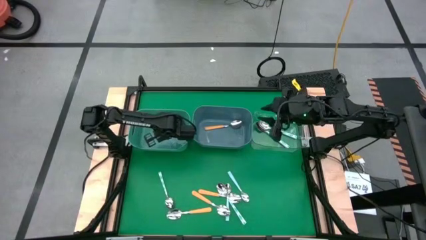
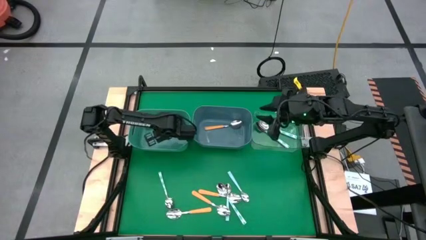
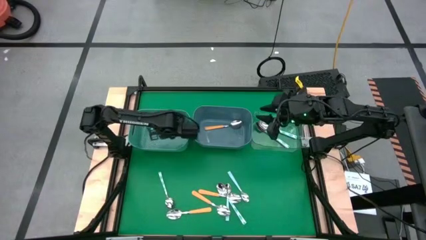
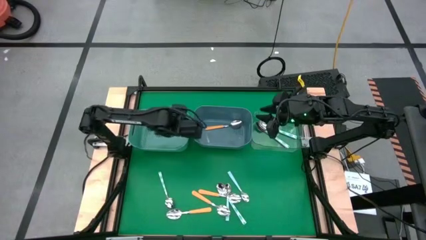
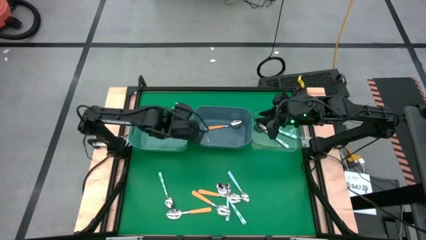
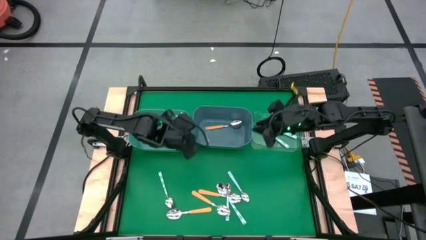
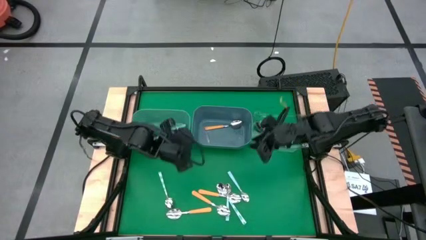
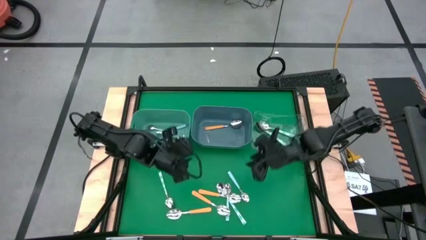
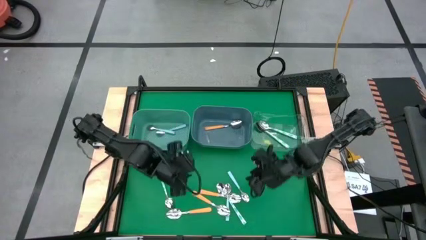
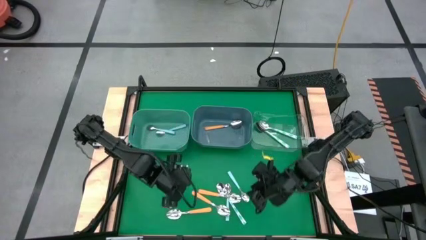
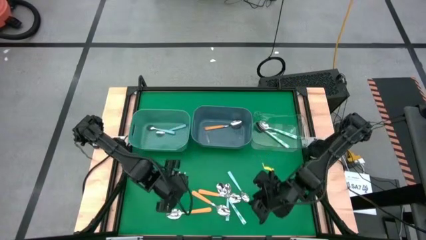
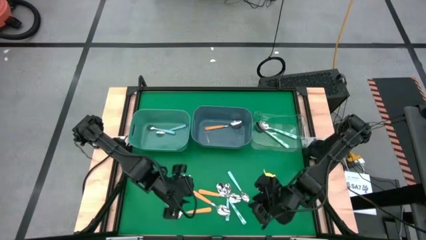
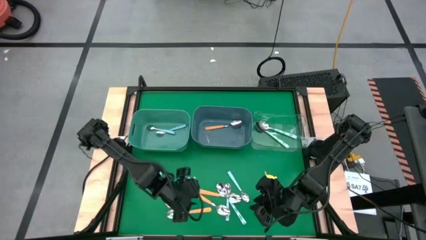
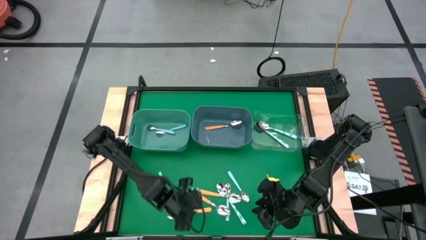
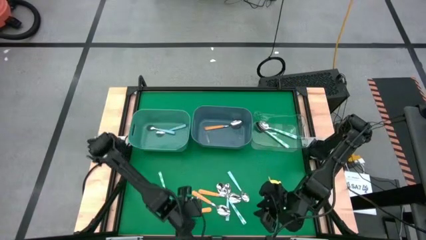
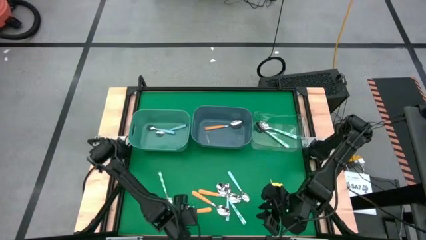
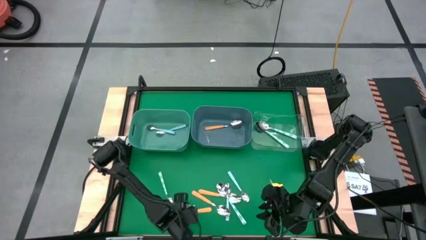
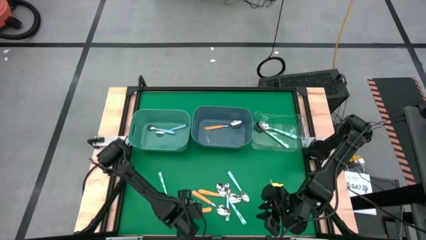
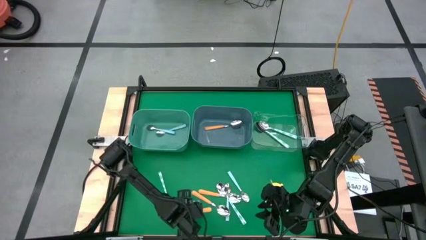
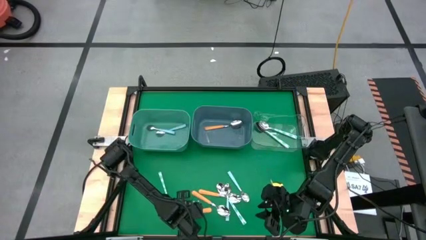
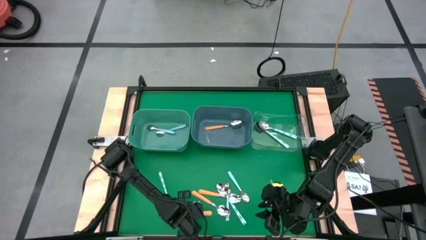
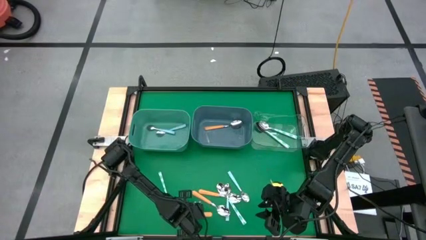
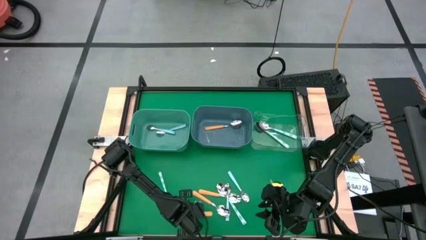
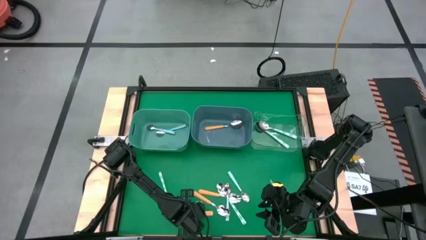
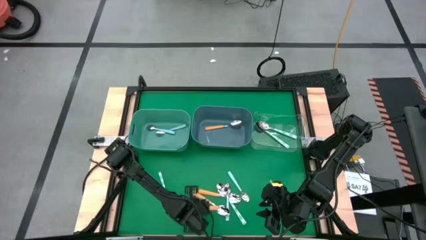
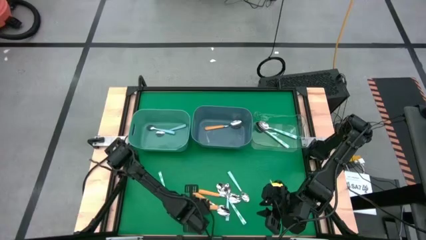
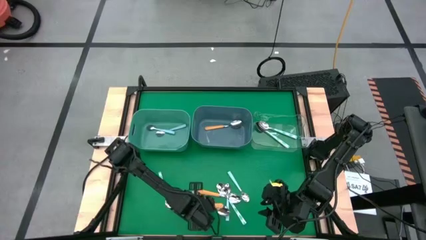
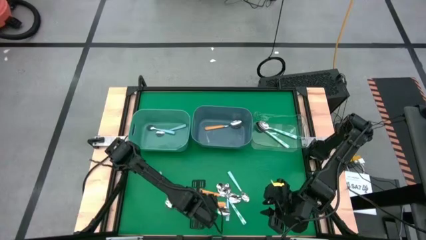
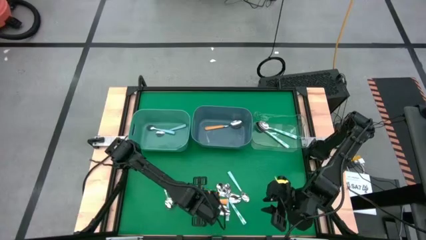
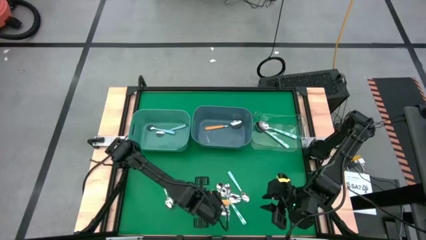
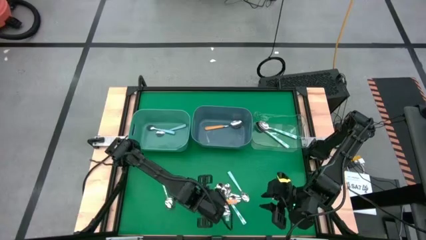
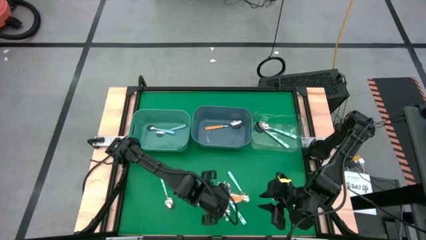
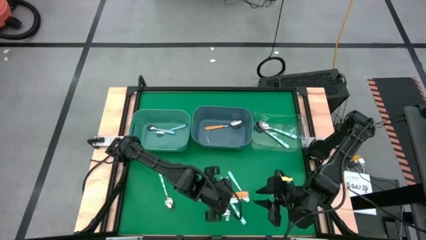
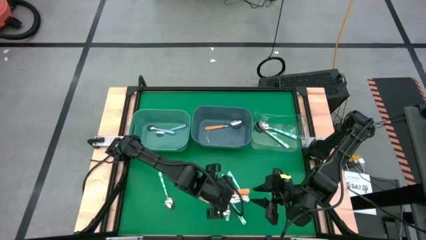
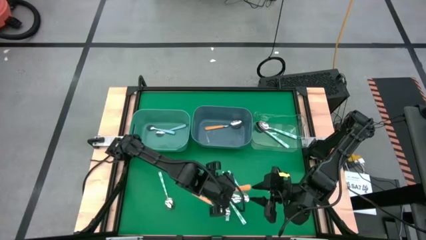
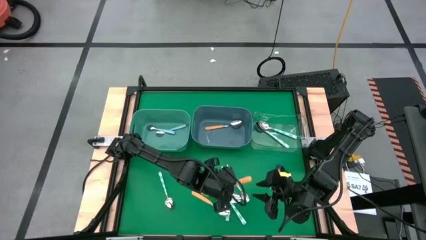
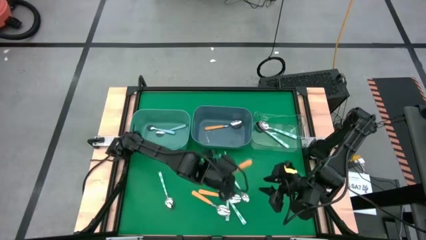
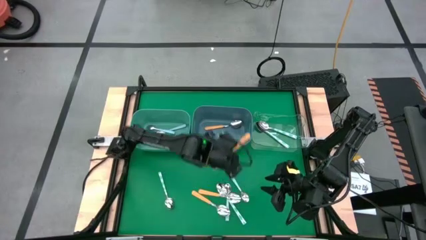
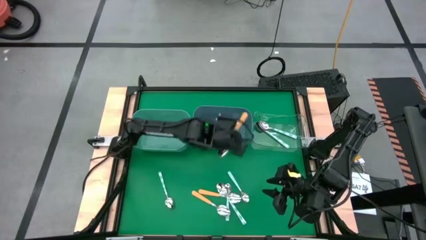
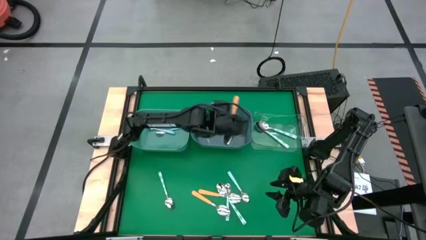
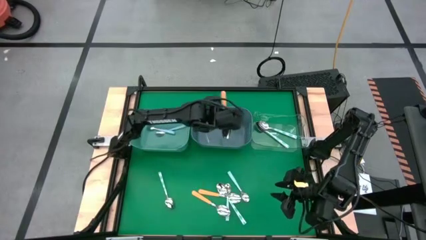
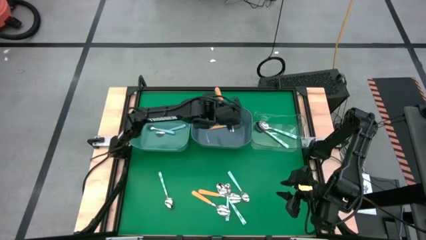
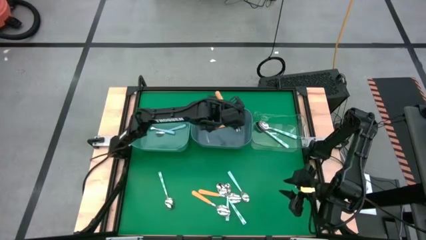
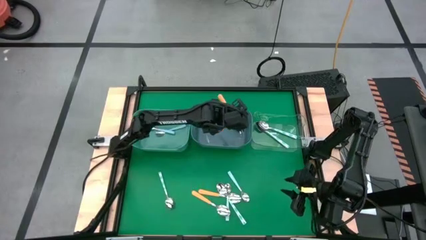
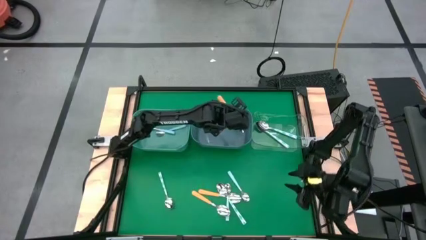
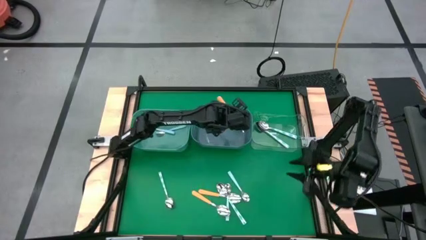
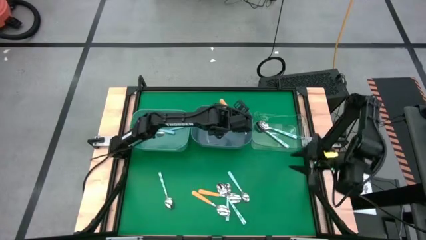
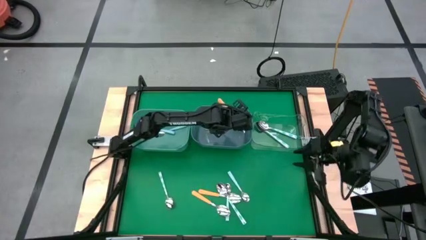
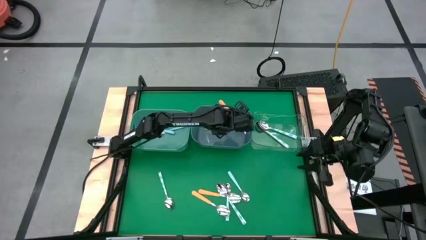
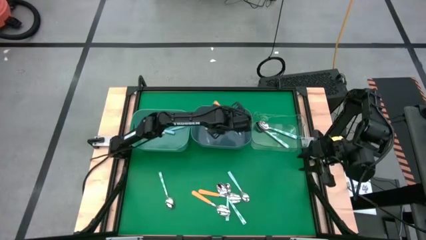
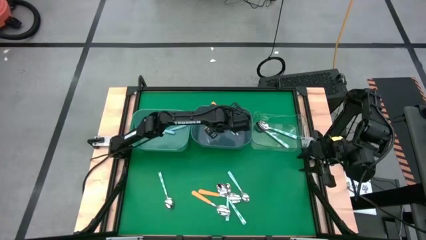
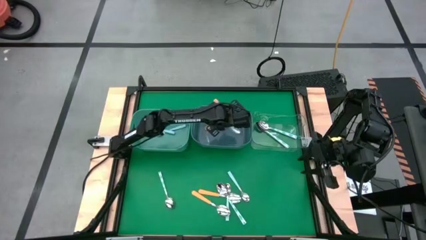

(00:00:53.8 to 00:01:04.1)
Task: Sort silverware by color (type)
Put the orange spoon into the blue bin

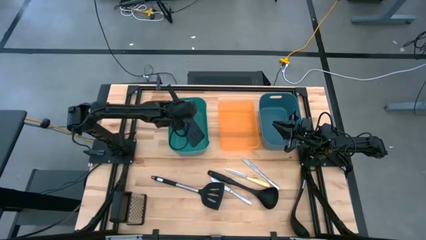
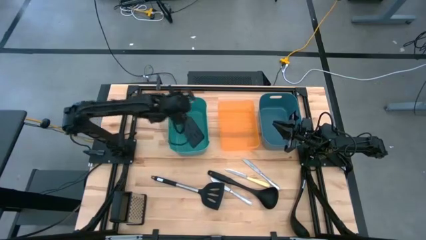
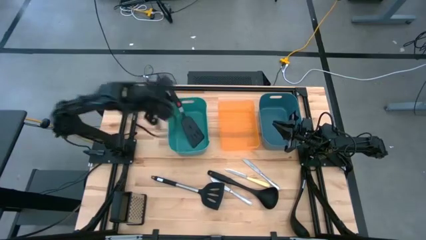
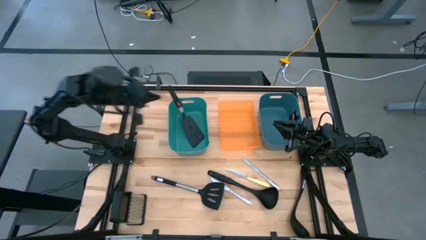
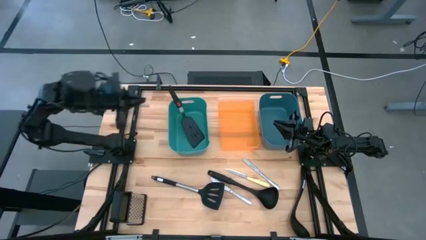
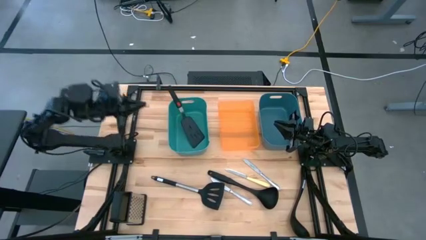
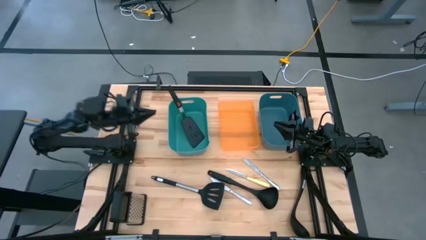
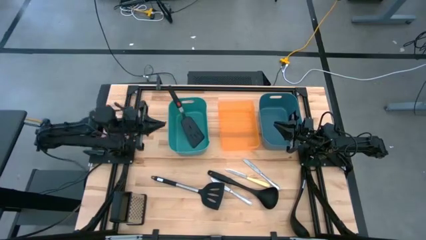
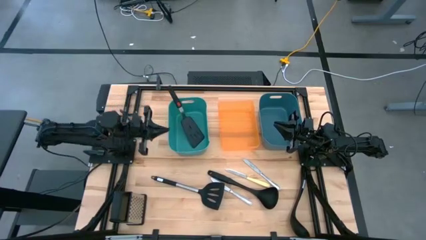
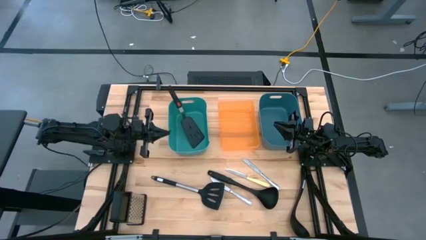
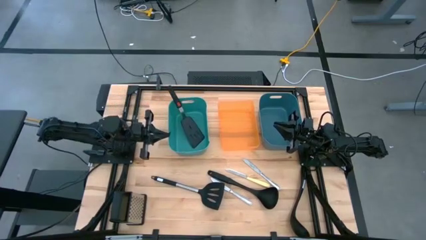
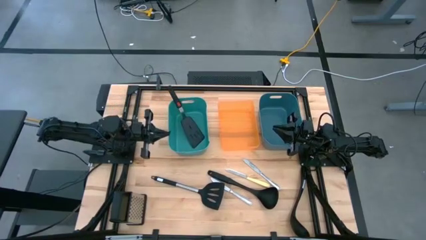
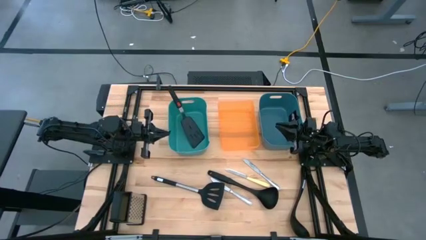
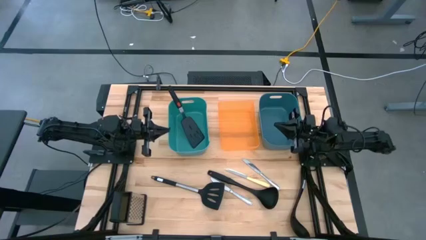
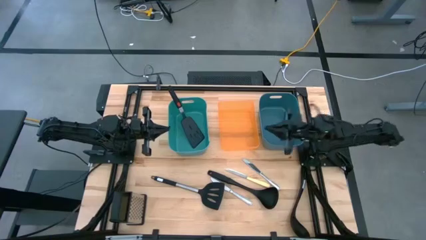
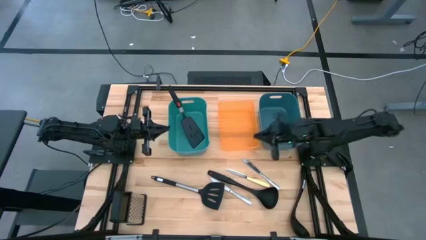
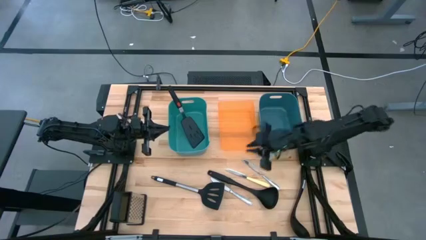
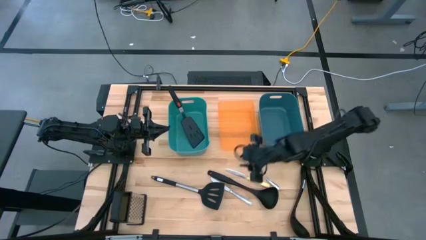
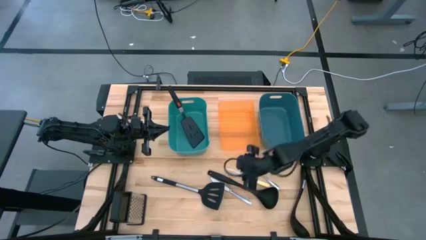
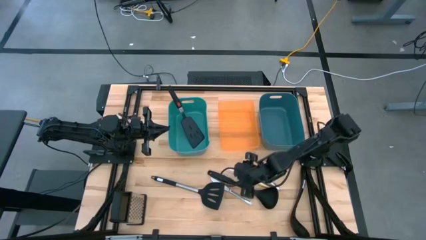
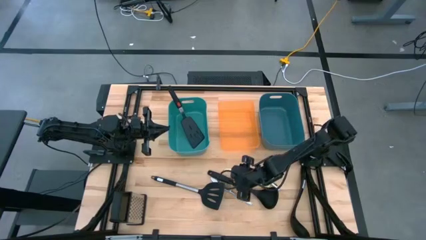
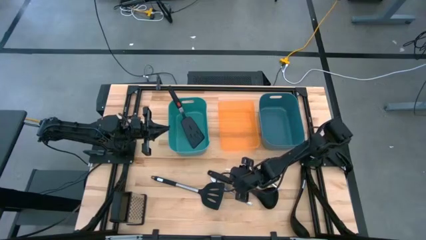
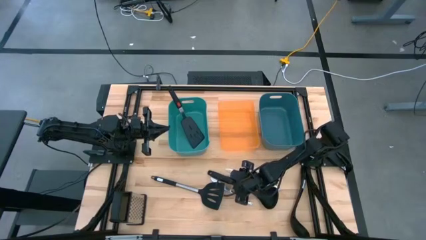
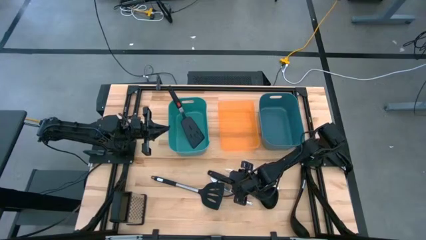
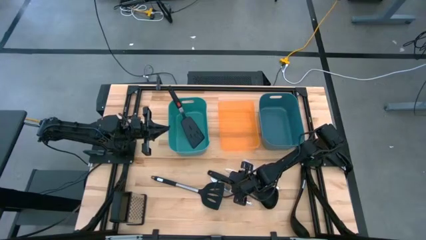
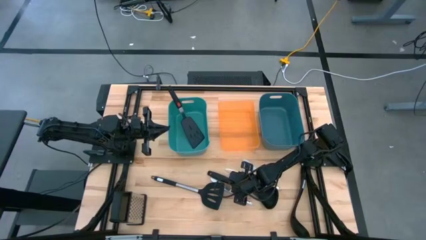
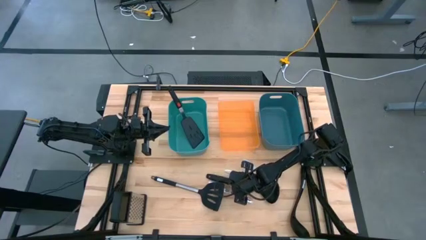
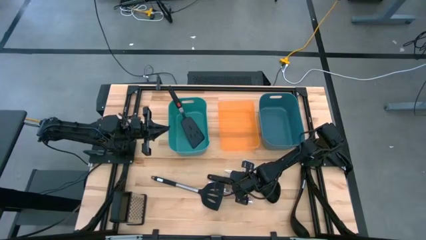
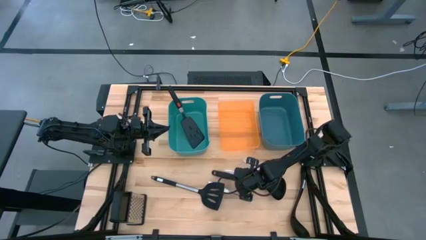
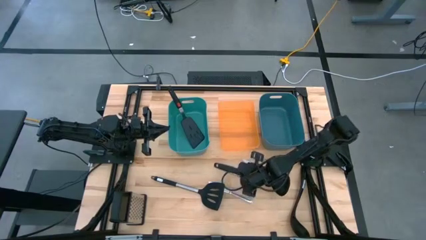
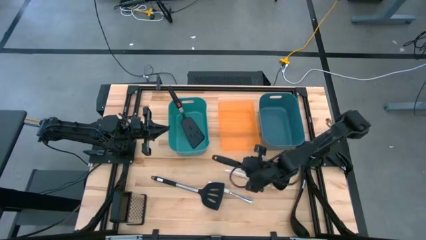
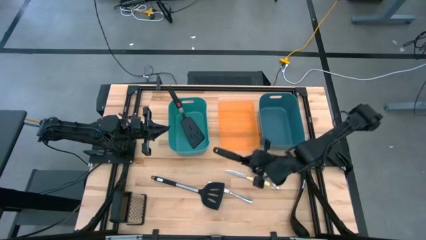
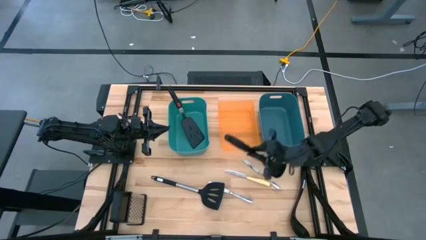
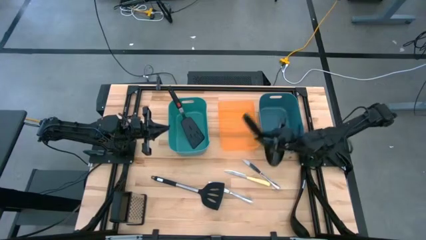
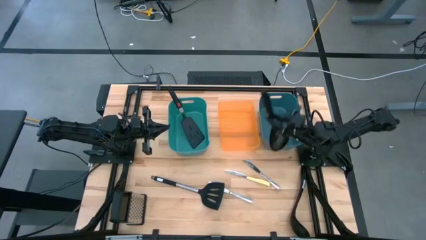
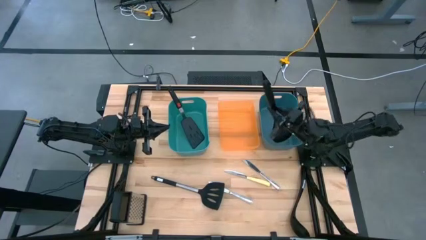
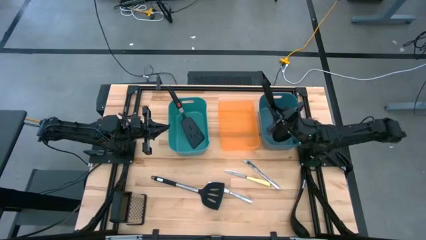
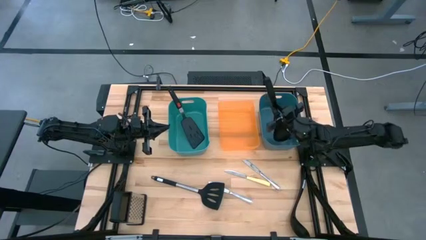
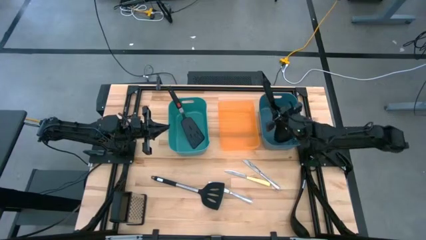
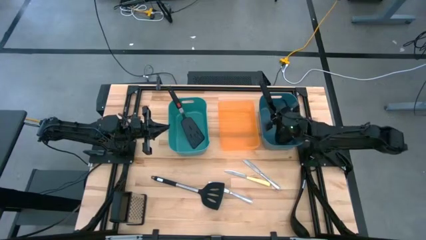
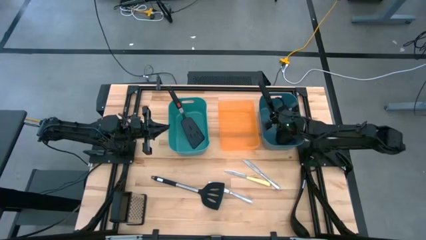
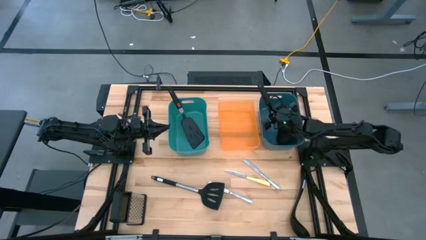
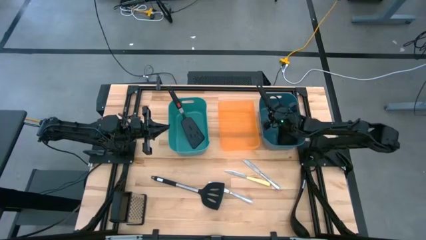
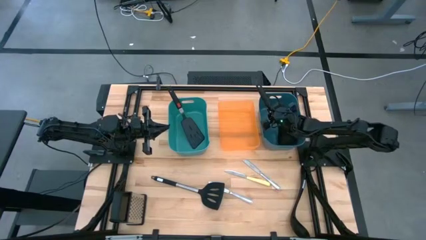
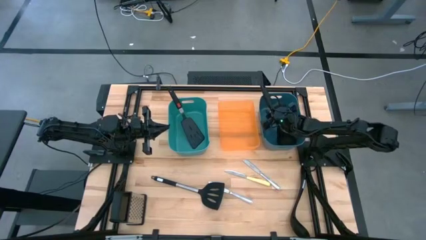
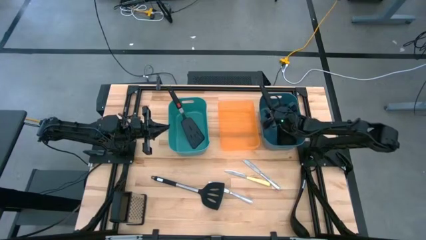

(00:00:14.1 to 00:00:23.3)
Task: Pick & Place Kitchen Items
Put the left black ladle into the blue bin
